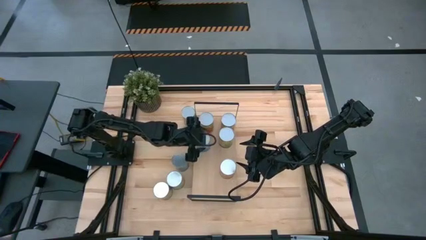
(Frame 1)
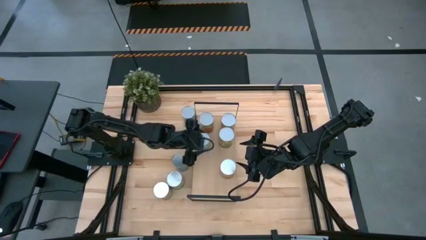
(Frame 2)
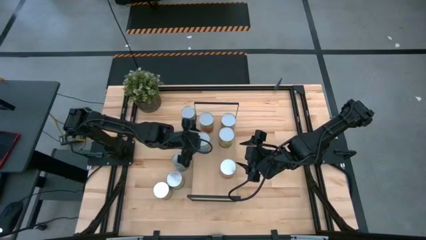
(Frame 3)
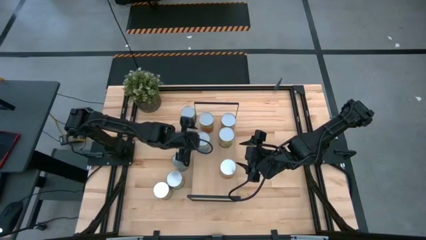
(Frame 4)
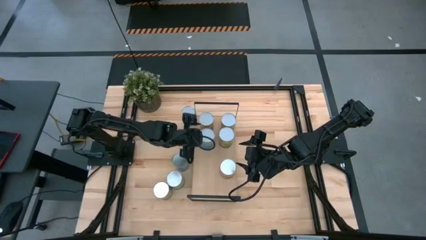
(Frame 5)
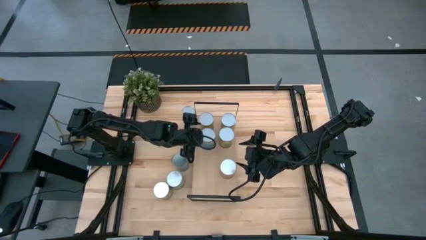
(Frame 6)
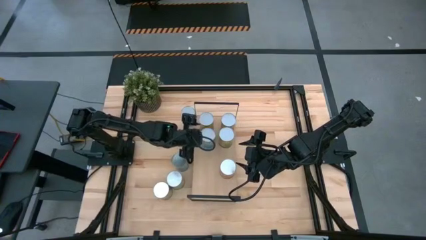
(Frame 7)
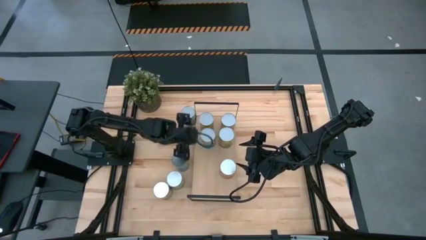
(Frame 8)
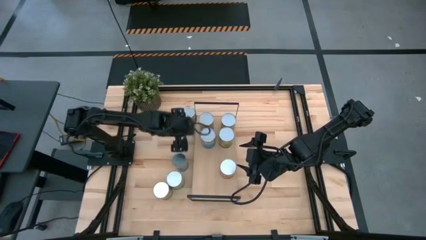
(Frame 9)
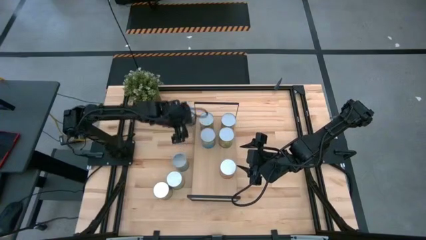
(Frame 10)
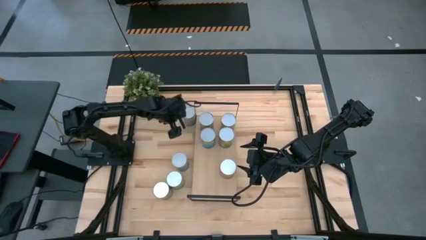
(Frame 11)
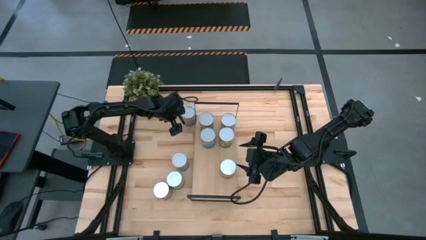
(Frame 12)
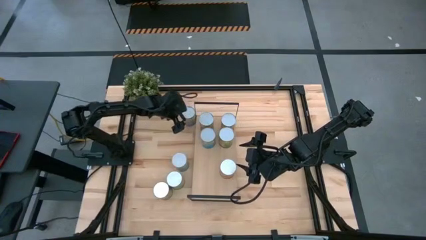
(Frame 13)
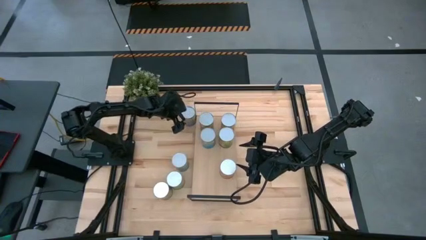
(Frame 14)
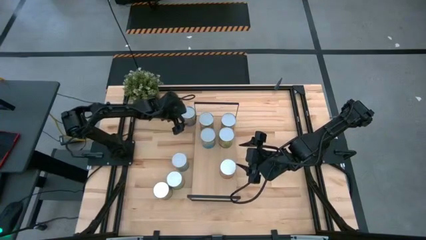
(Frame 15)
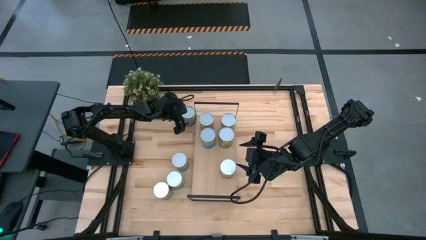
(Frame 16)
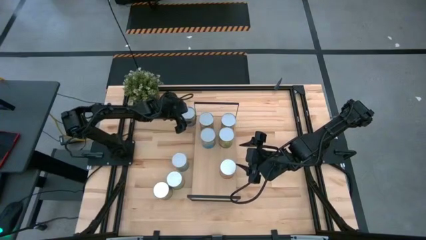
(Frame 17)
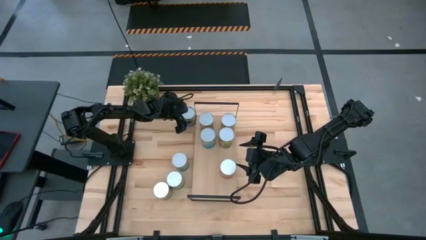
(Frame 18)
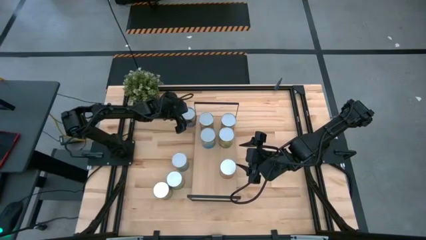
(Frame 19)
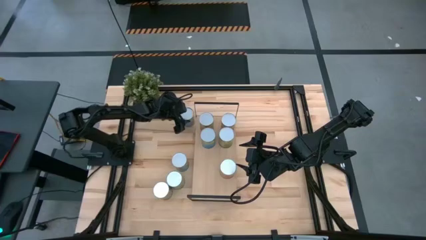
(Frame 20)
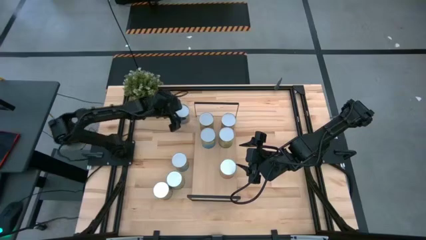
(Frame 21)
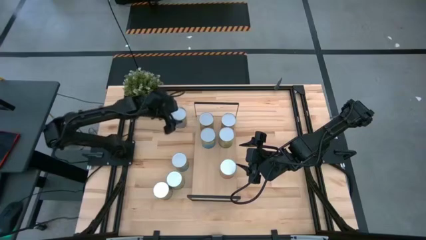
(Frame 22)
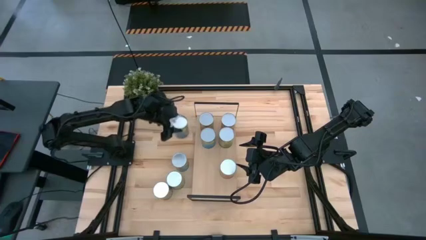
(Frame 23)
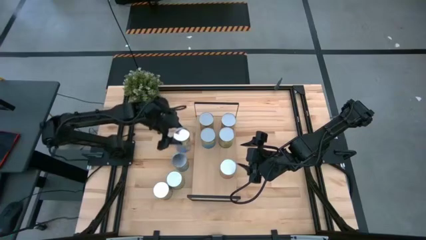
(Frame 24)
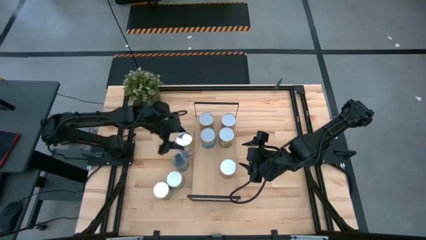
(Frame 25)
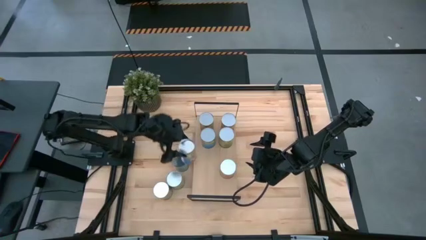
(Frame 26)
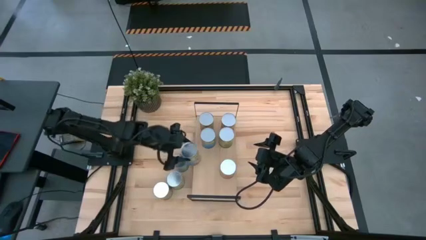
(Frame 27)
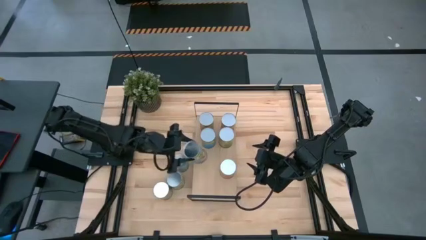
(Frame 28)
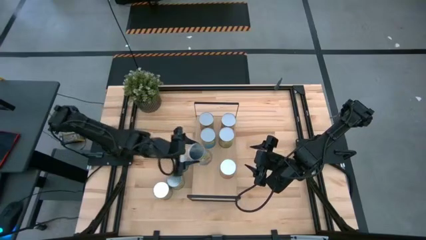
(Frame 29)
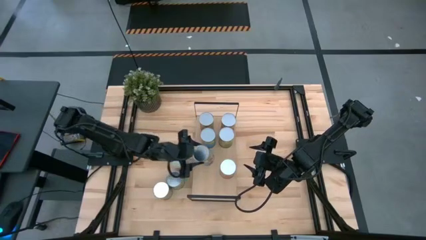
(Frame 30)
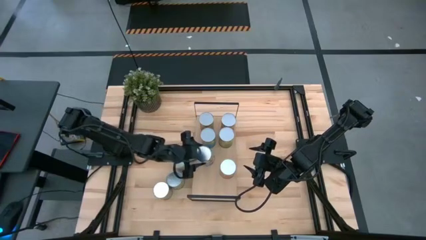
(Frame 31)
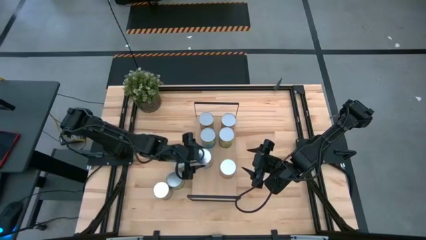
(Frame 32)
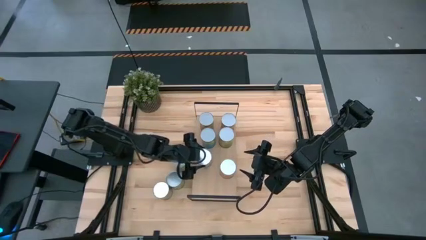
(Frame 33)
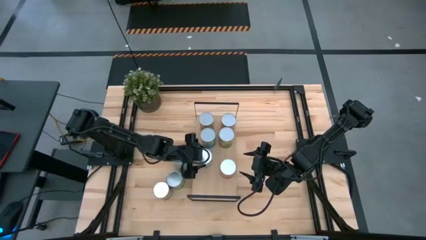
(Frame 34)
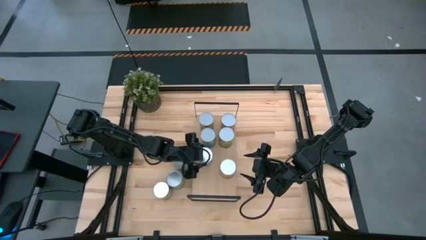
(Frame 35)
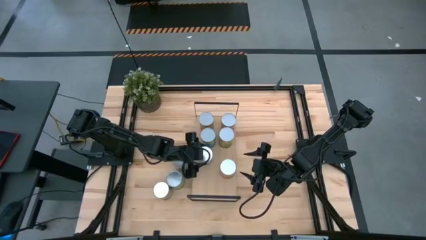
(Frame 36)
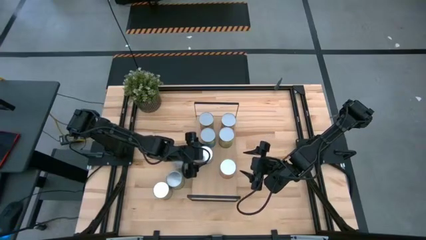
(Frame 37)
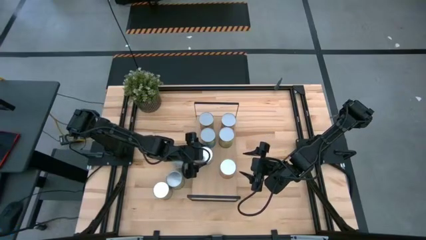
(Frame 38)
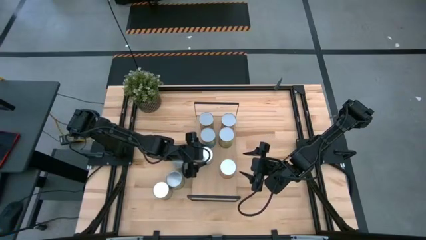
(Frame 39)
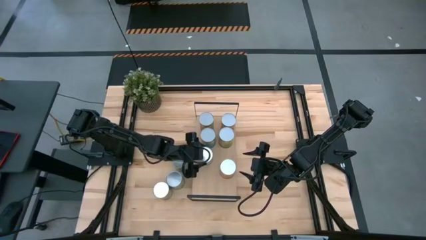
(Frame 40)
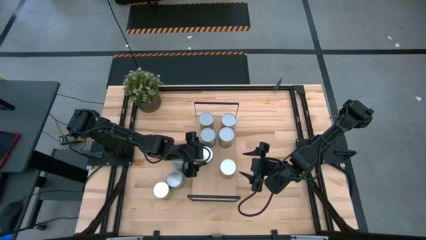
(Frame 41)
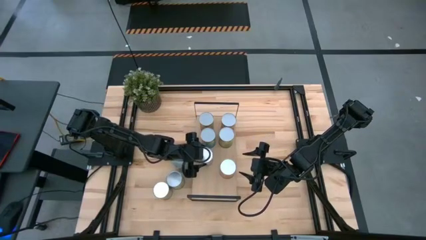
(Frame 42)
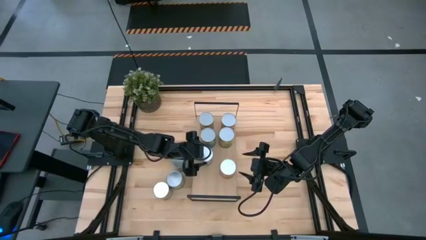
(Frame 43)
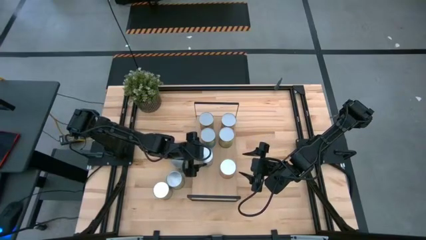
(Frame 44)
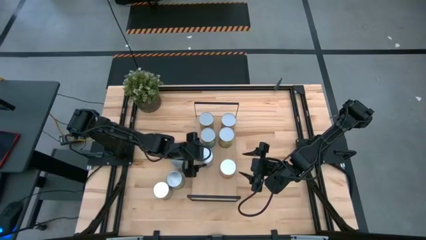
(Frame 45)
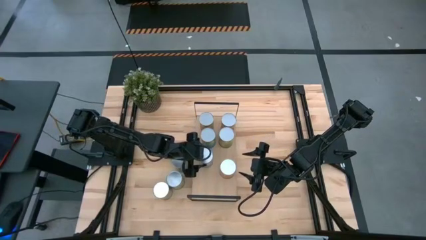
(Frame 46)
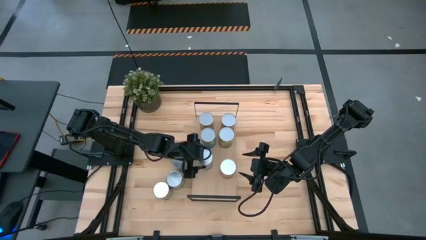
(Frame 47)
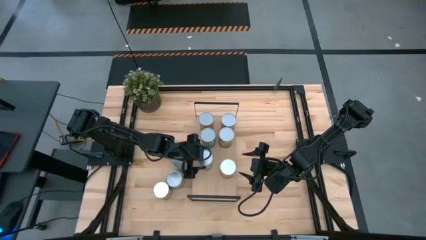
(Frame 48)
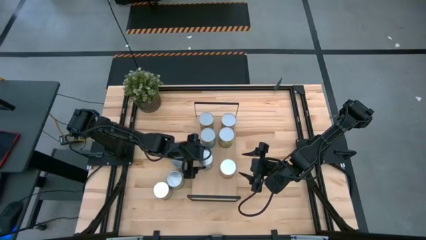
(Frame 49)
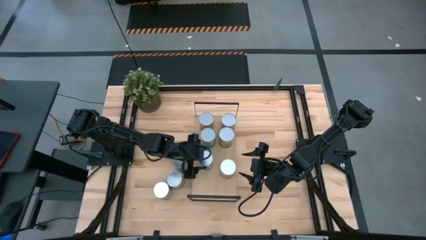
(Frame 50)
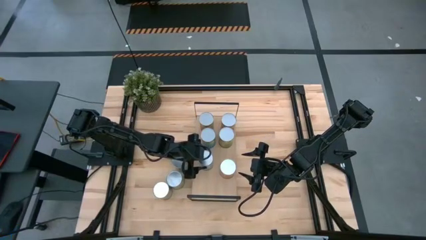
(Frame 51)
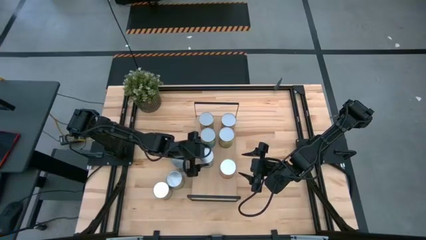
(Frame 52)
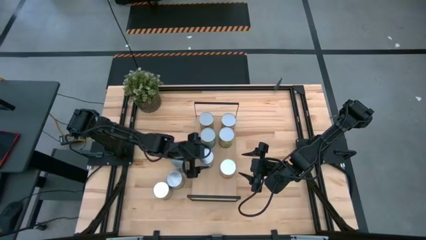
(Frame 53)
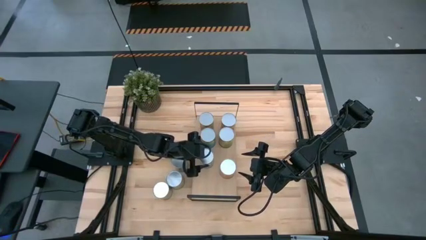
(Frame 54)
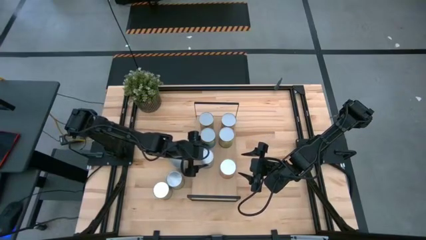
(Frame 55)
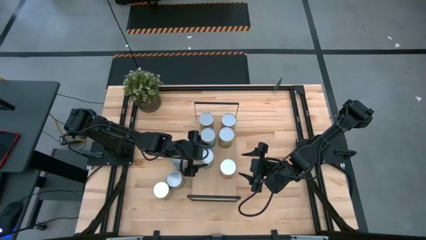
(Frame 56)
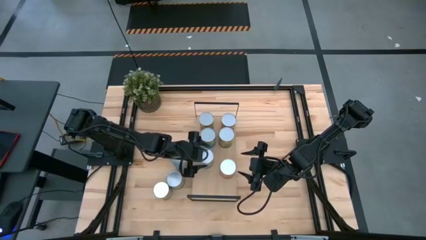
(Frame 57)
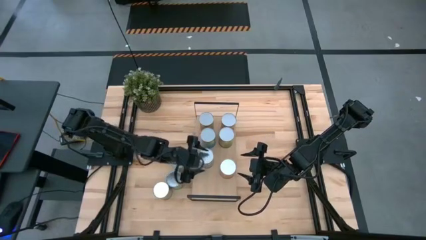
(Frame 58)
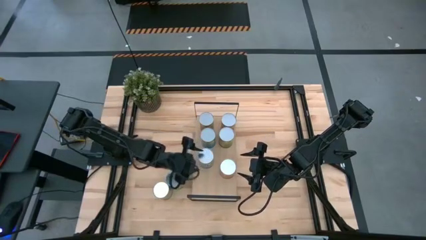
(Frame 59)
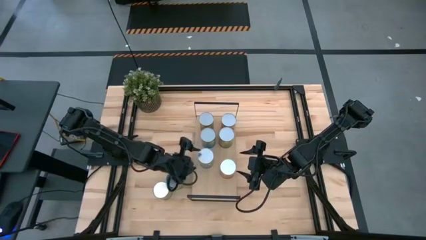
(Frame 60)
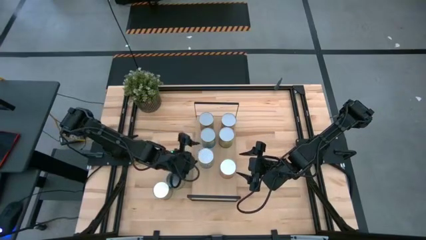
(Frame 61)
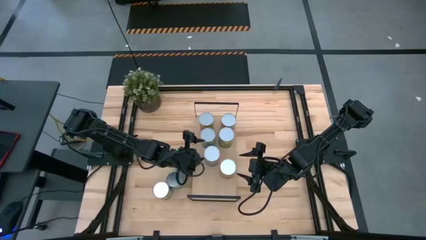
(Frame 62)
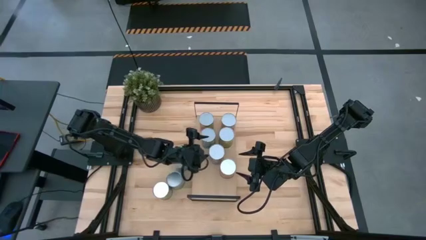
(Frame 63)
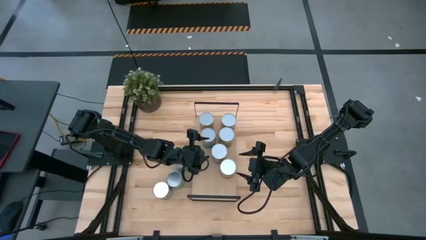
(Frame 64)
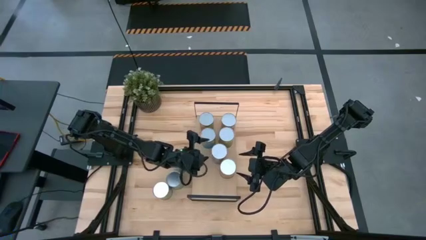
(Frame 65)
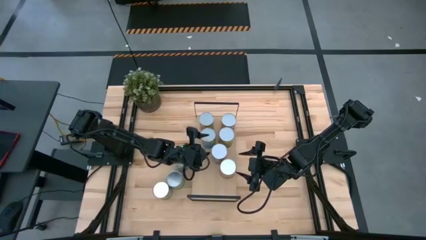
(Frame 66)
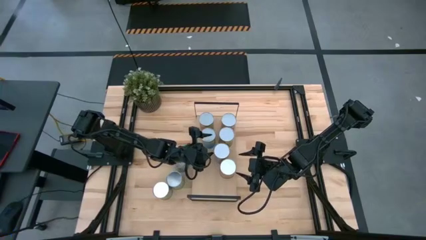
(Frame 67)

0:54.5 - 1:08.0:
Task: Pick and place cans onto a shelf
Put the canned peaches on the shelf

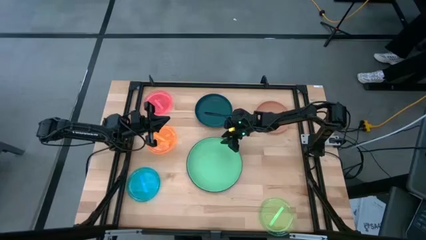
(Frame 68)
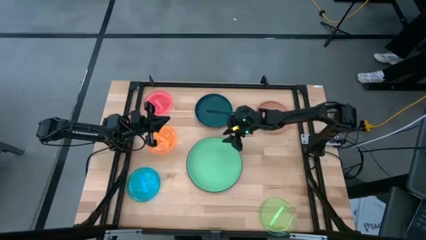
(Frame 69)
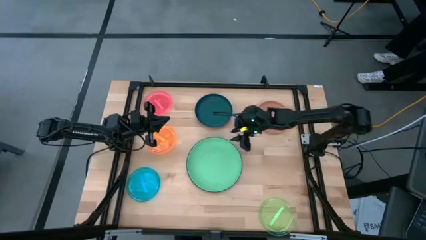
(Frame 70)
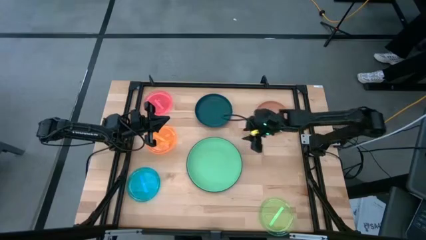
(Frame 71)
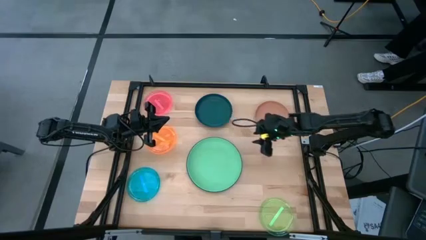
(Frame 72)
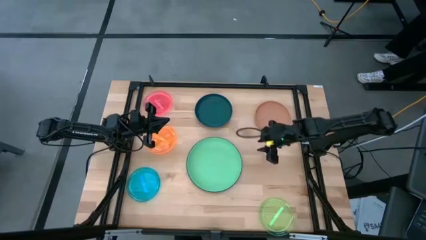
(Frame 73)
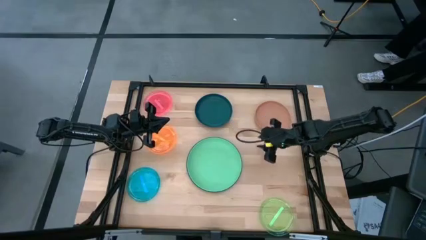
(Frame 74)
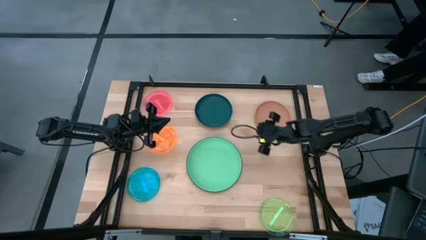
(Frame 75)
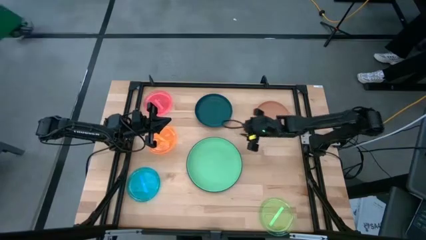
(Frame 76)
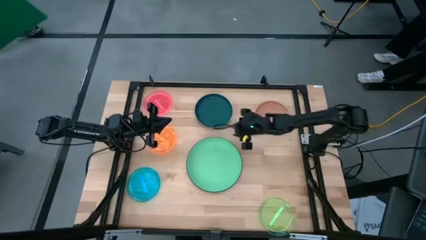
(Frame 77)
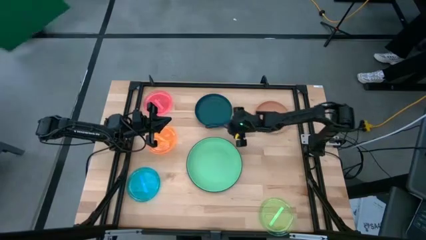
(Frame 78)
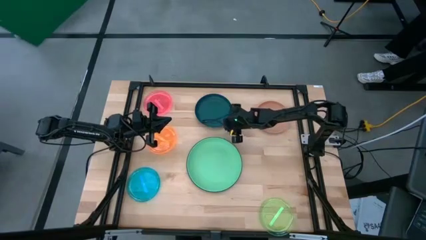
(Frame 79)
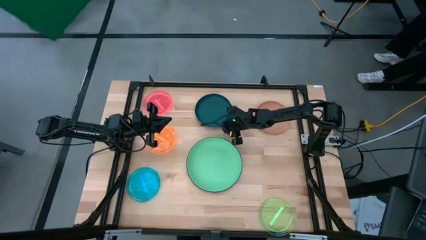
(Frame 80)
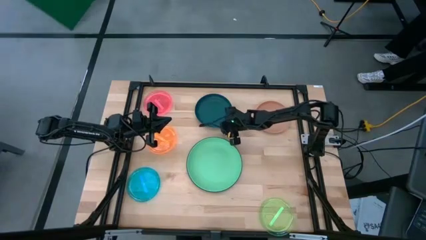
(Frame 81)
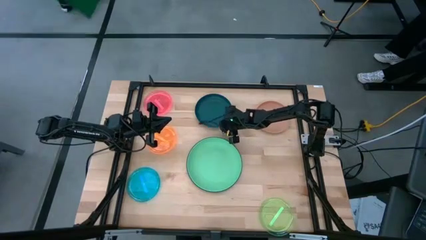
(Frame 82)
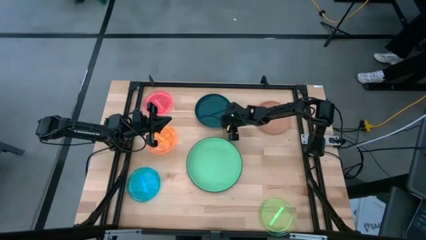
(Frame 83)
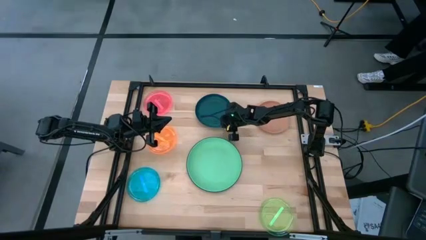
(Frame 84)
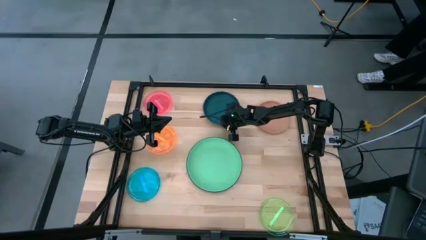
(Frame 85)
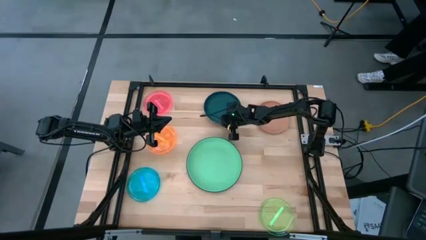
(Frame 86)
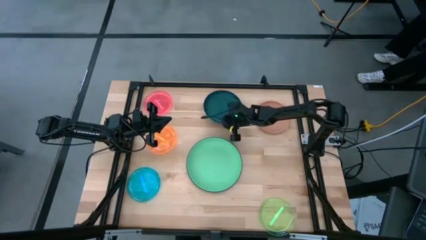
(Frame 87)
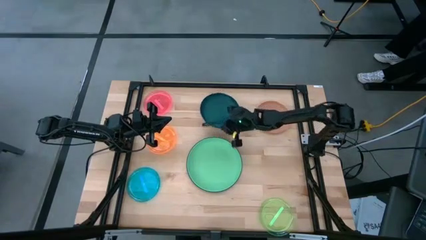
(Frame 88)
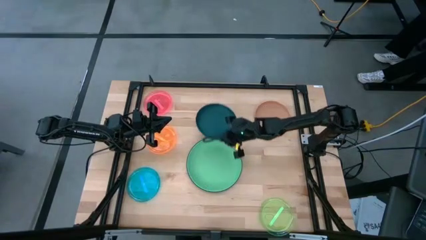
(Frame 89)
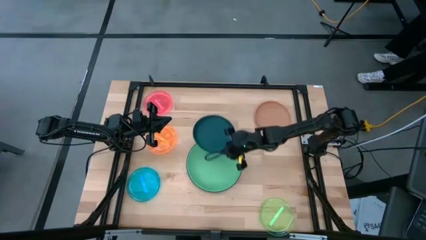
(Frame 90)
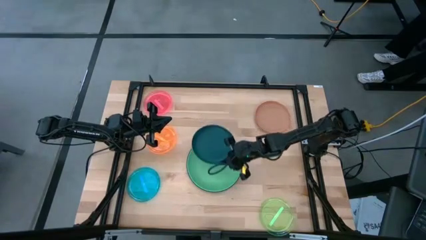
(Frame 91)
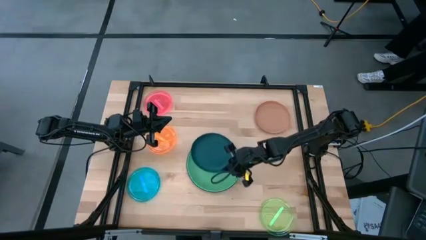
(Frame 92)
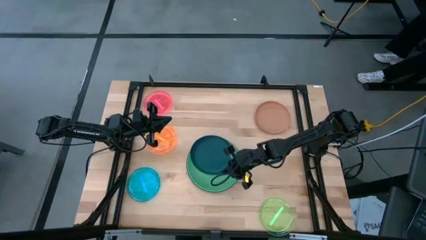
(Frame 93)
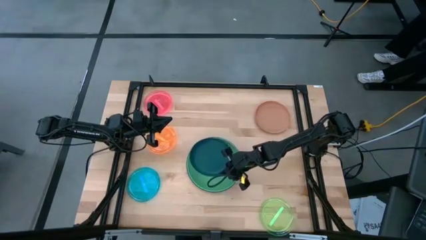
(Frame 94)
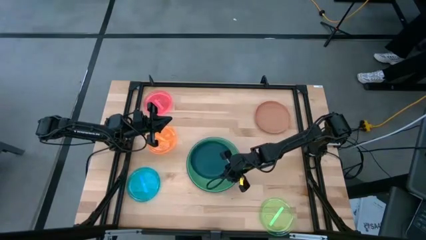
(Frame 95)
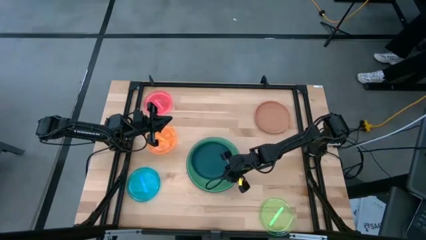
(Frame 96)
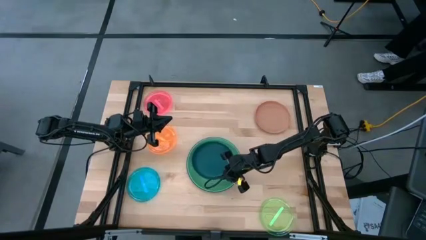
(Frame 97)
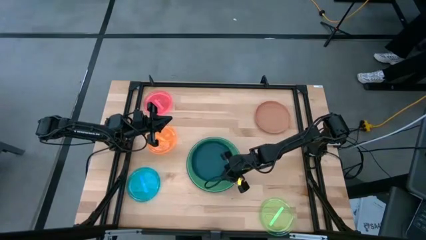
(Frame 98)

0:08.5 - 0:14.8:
Task: Stack plastic plates
Stack the dark blue plate on top of the green plate
